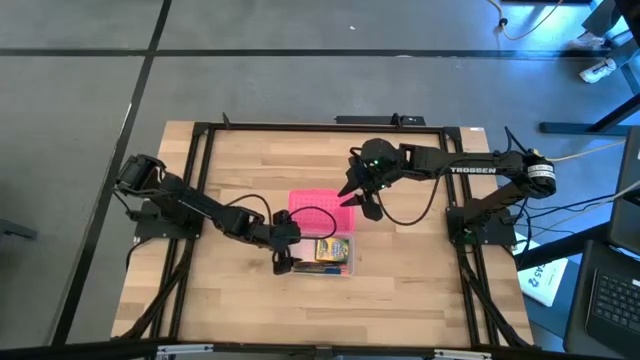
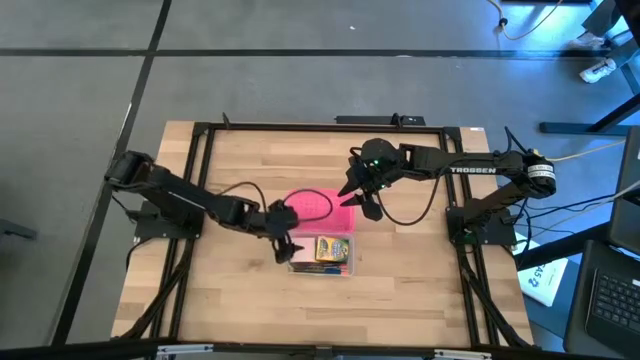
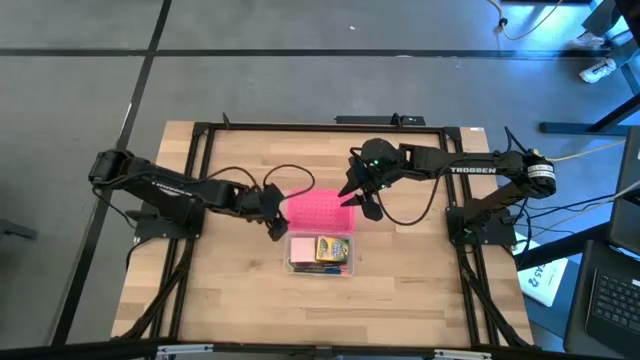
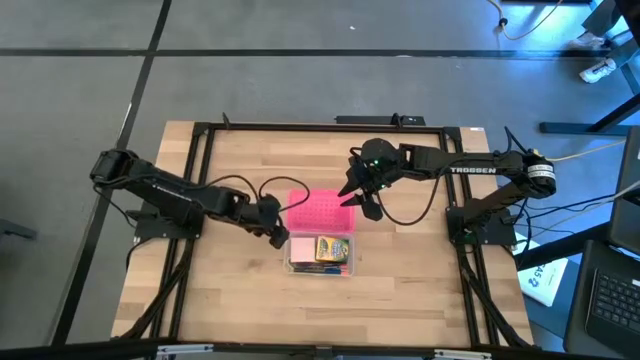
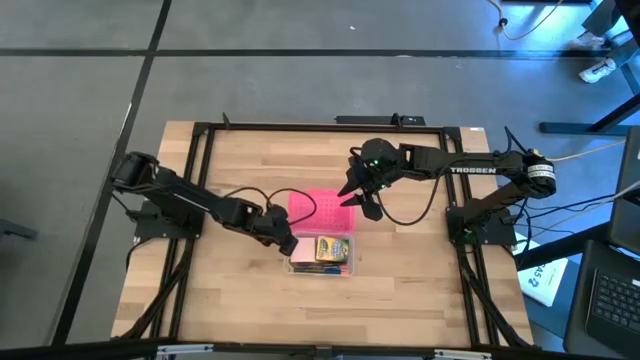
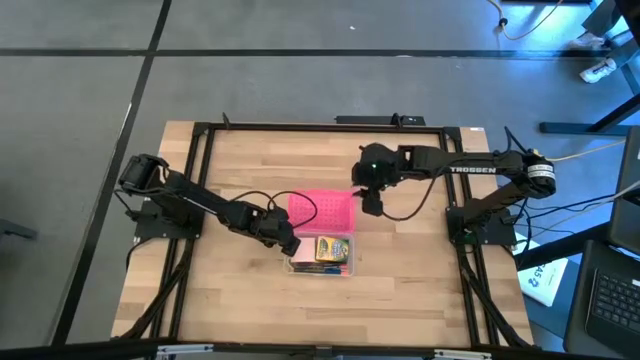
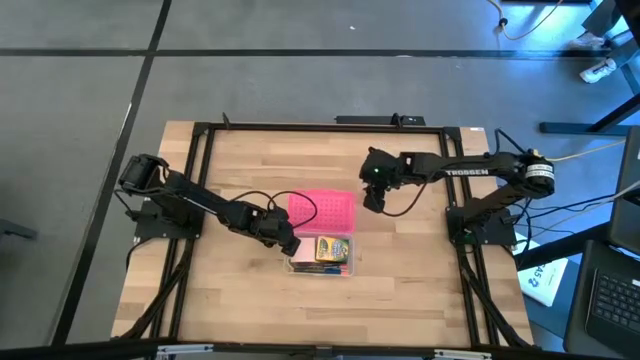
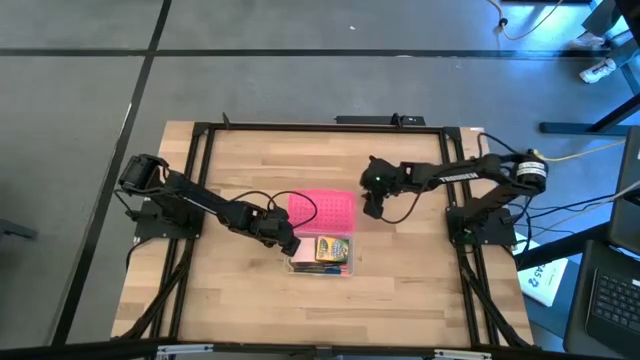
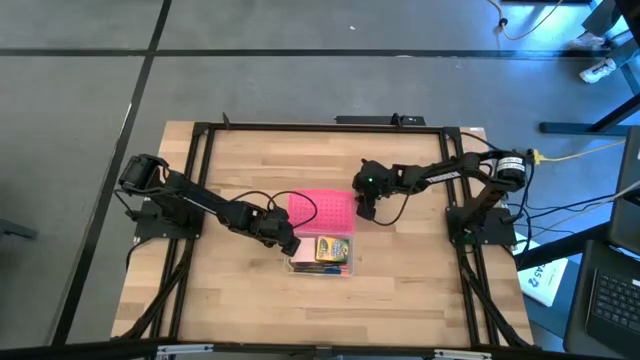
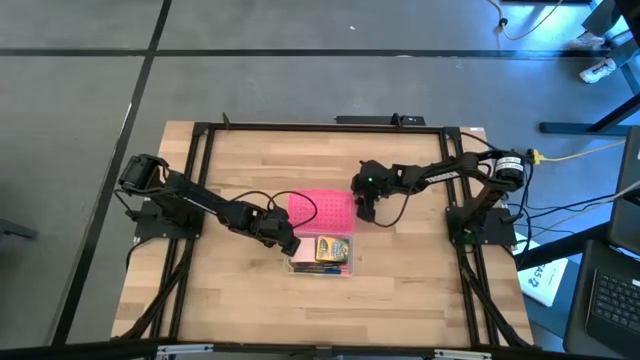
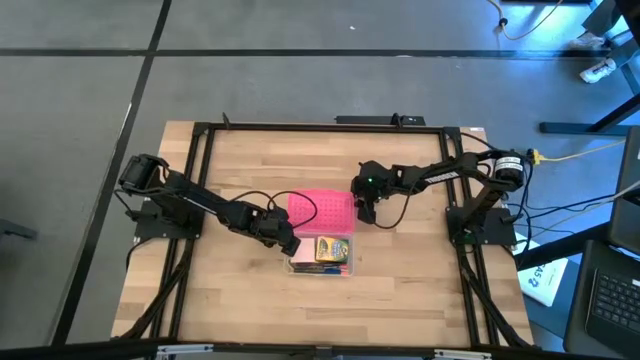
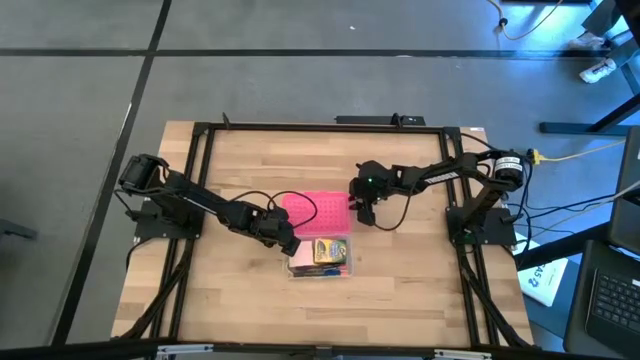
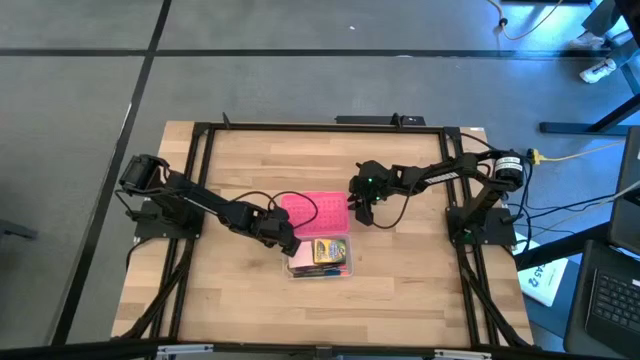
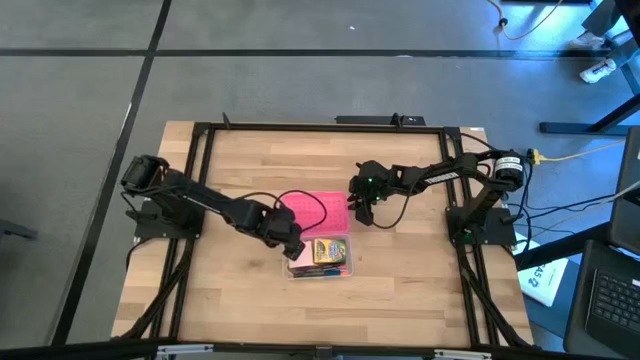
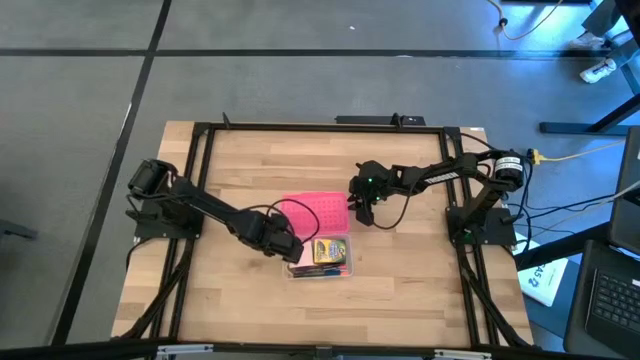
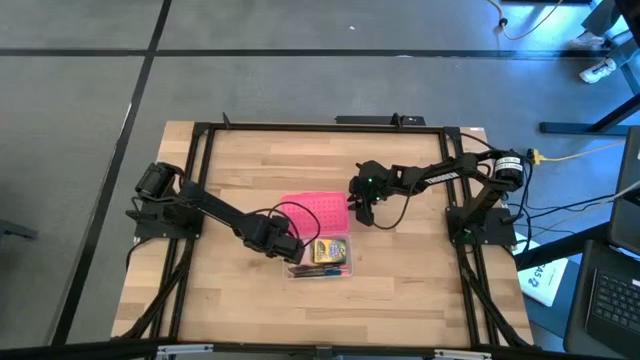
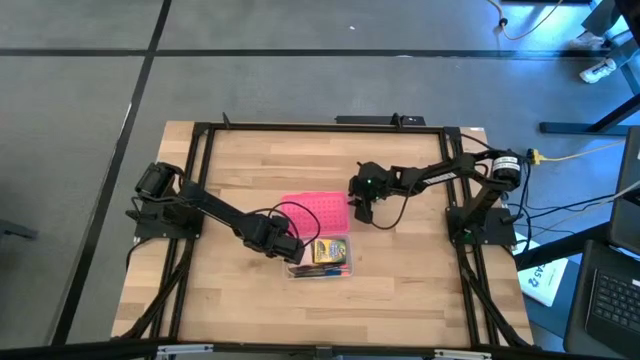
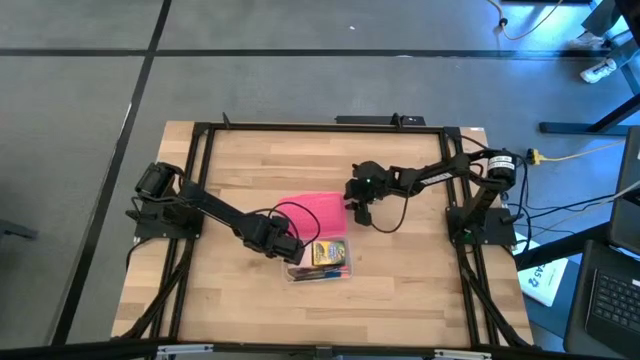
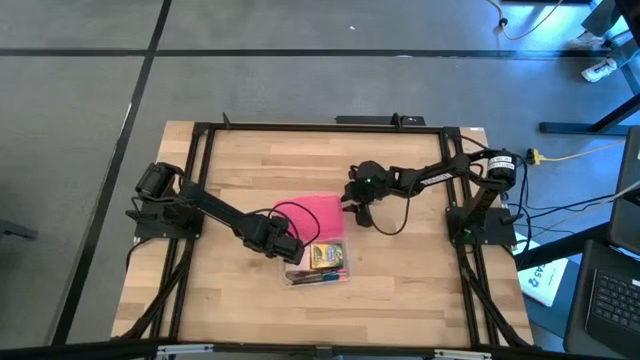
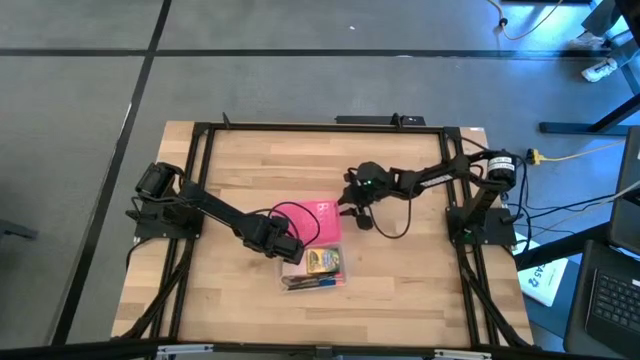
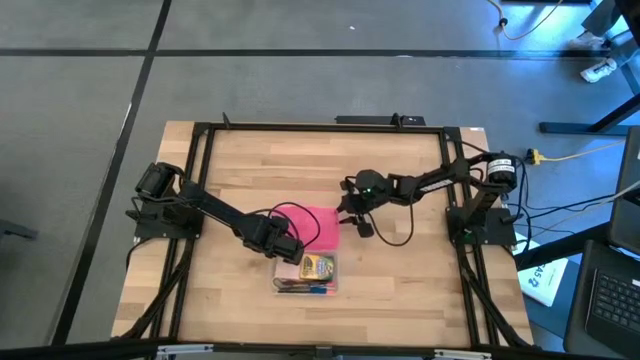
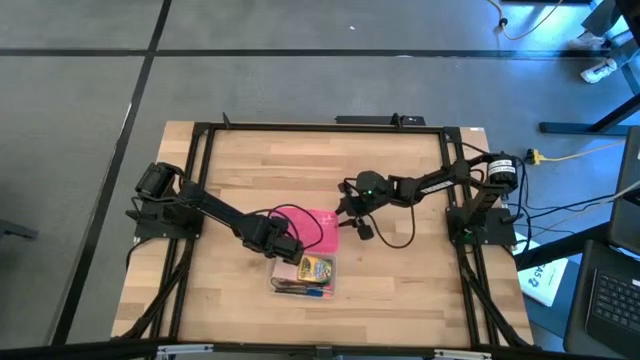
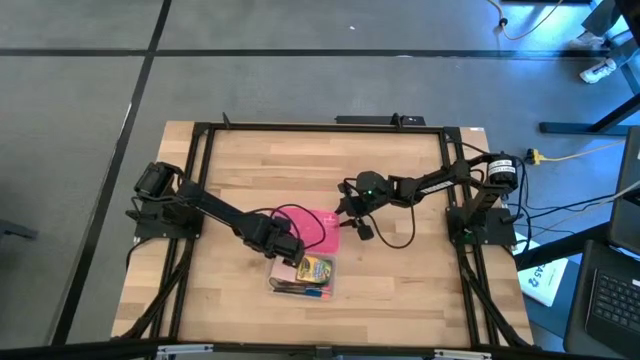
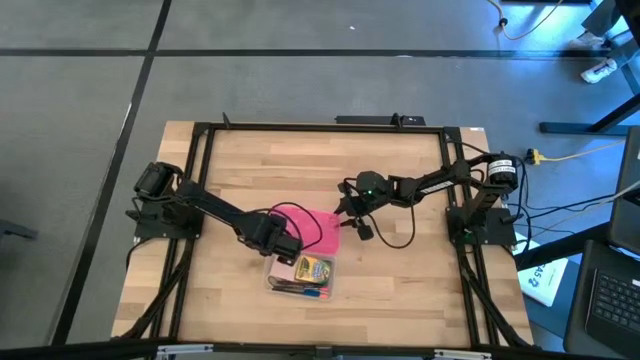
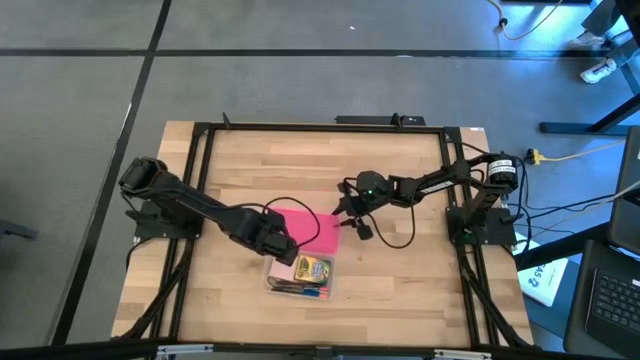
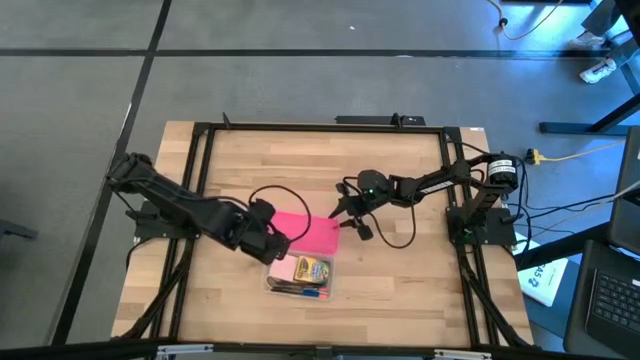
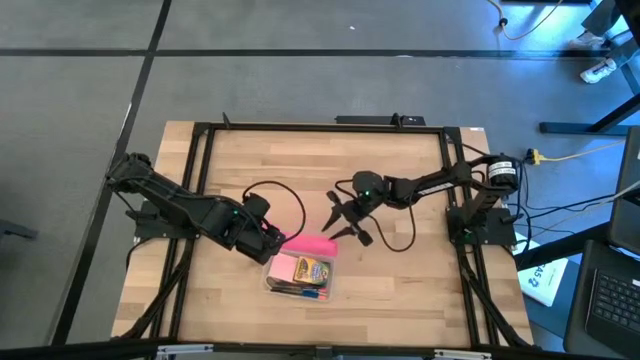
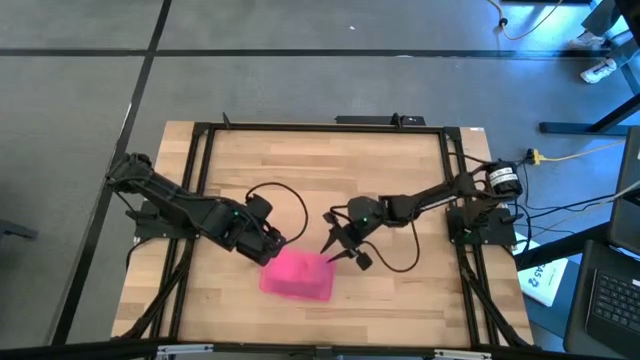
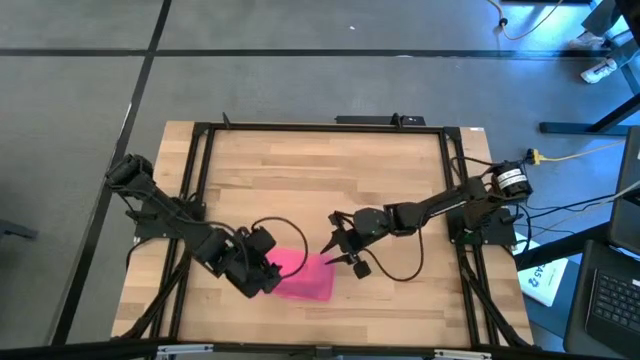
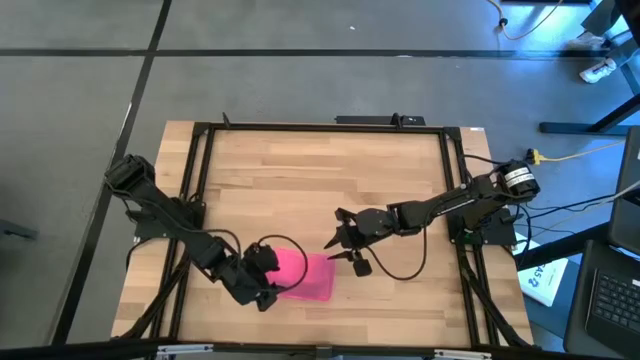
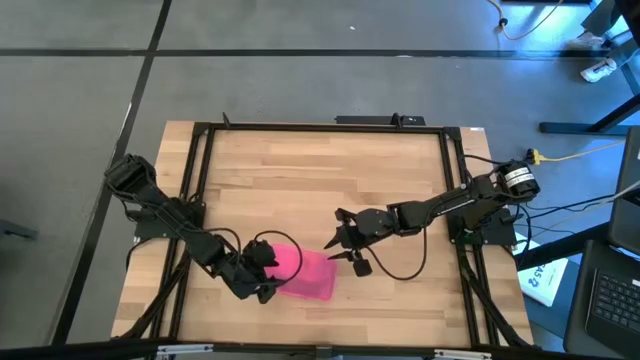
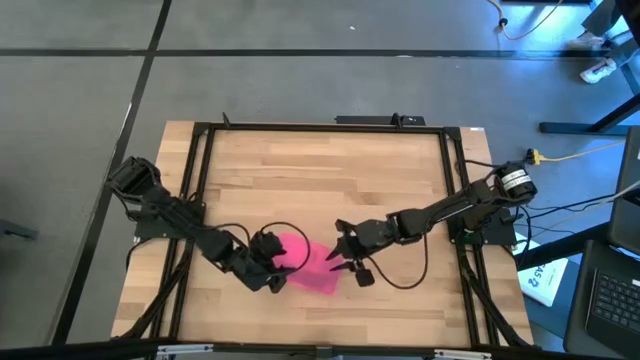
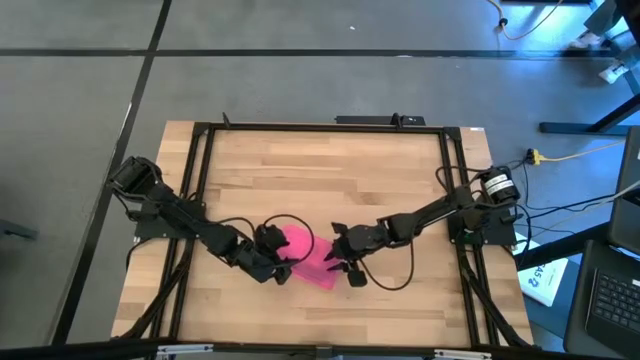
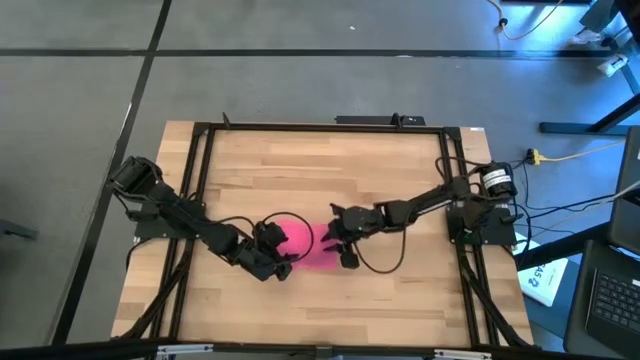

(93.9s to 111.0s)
Task: Pack school essentials
Close the pink supply box

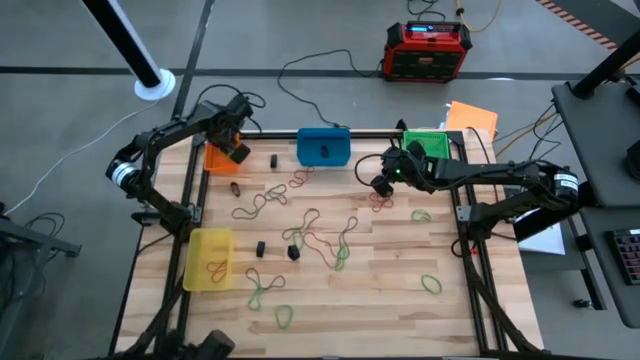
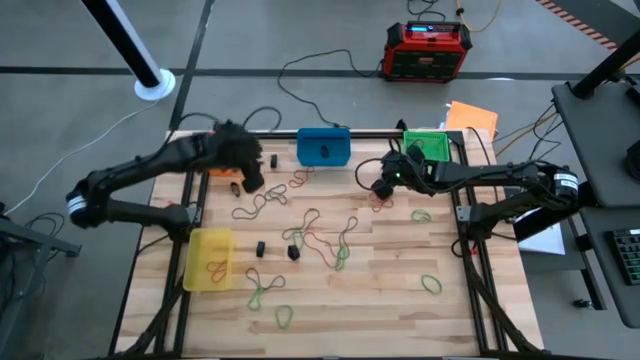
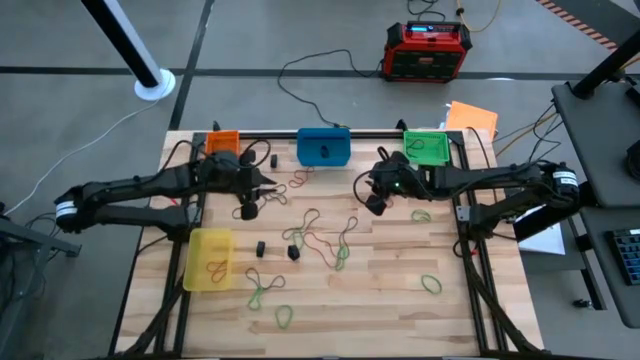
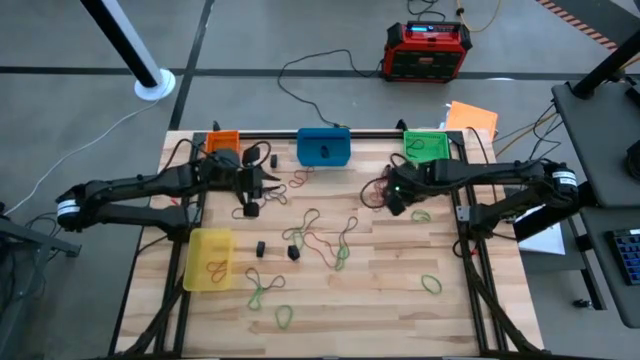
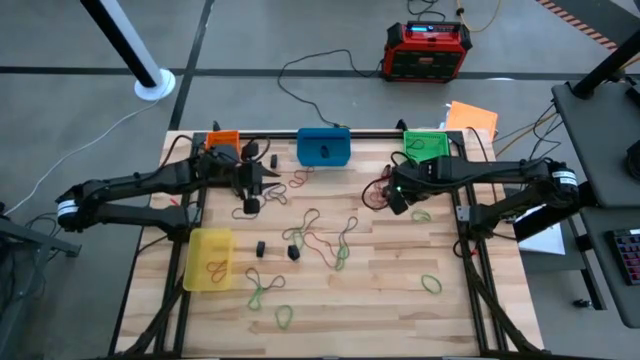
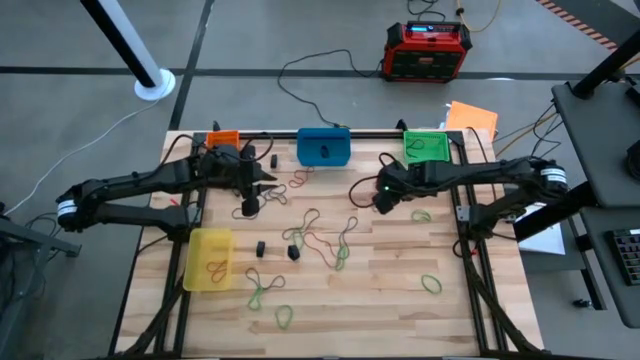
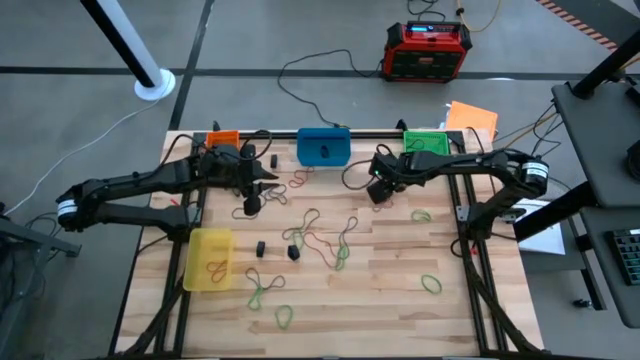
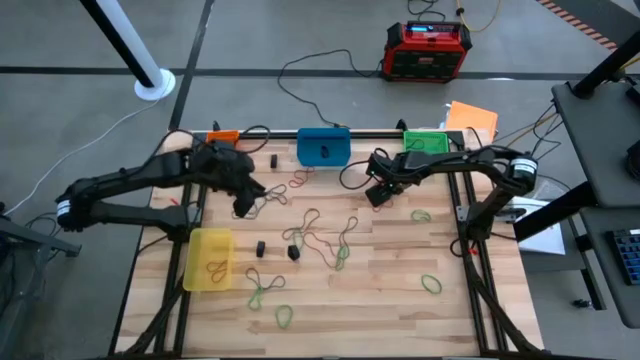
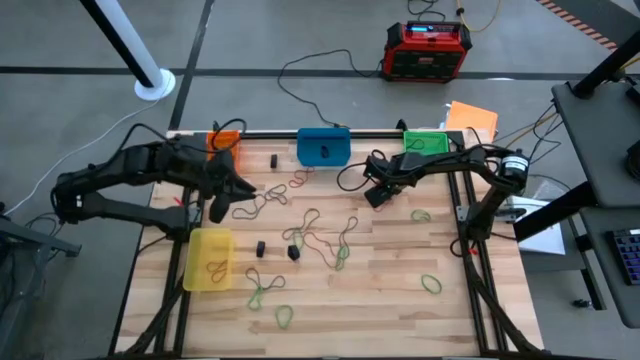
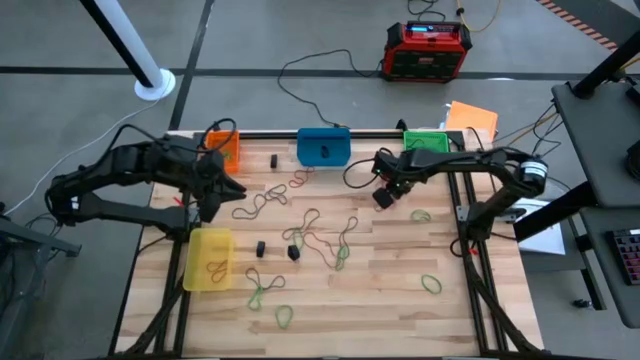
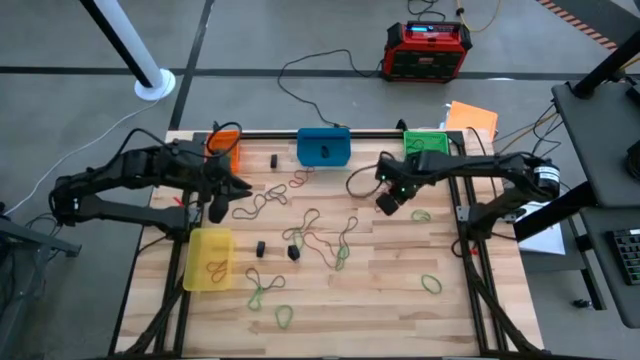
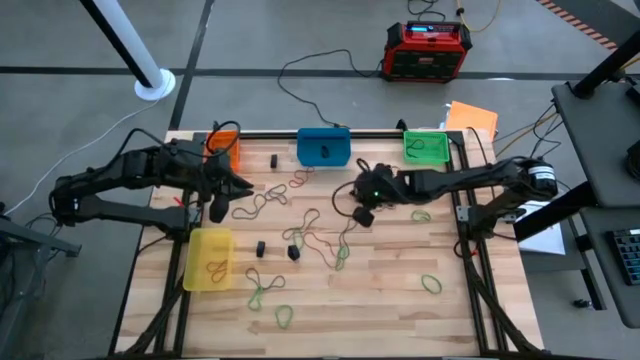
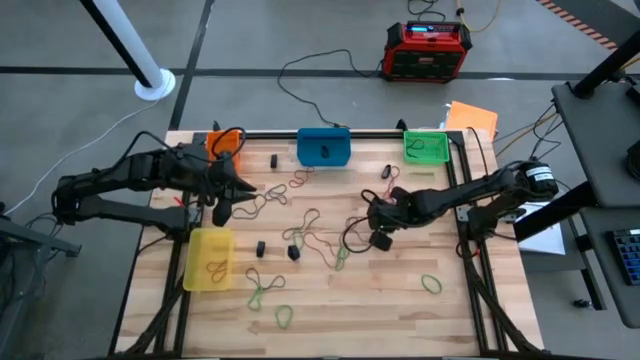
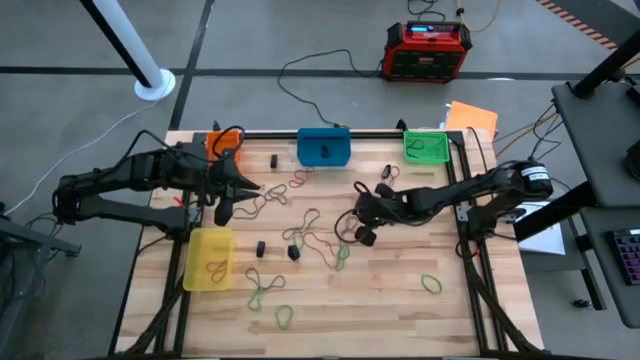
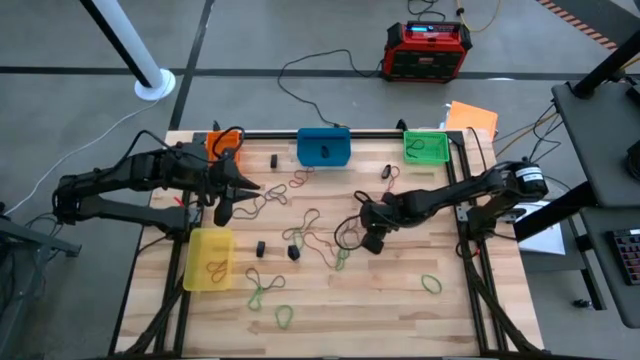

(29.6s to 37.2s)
Task: Sort rubber bands into baskets
Put the black rubber band into the blue bin
